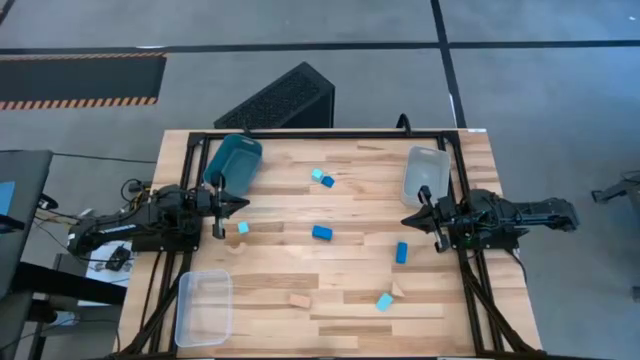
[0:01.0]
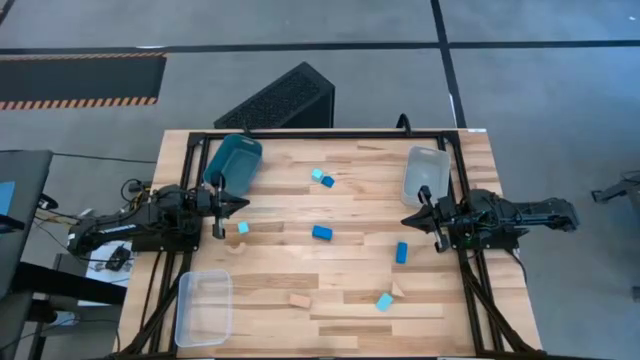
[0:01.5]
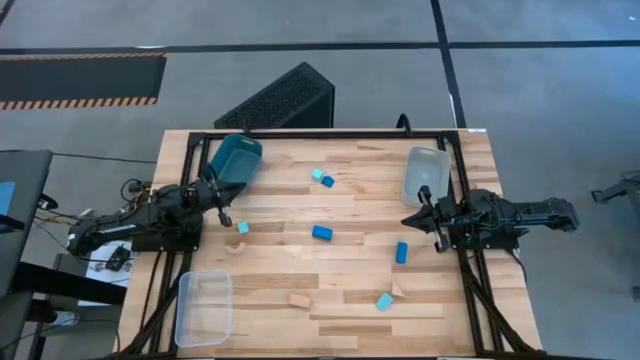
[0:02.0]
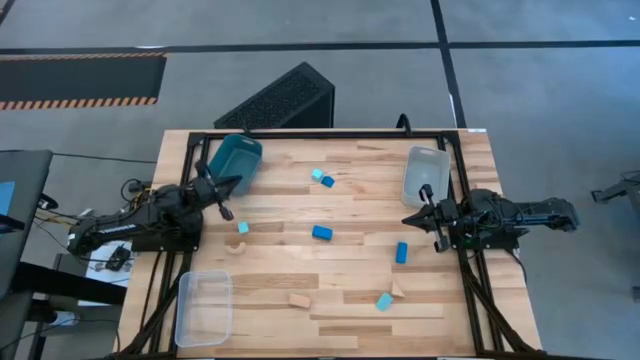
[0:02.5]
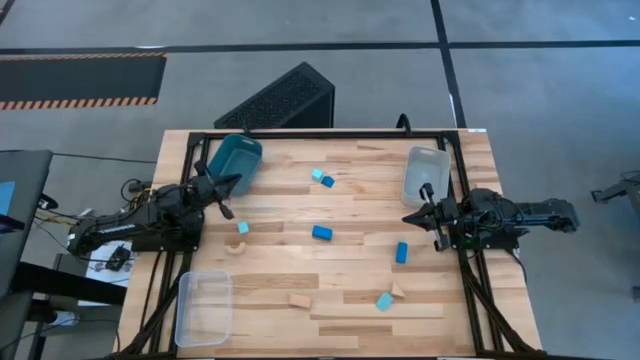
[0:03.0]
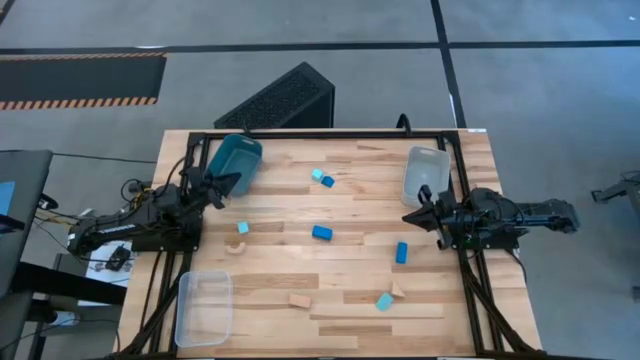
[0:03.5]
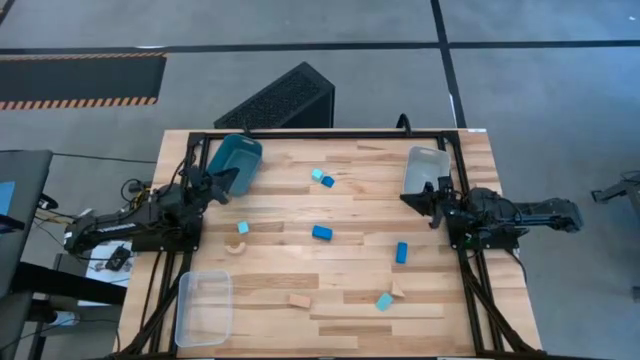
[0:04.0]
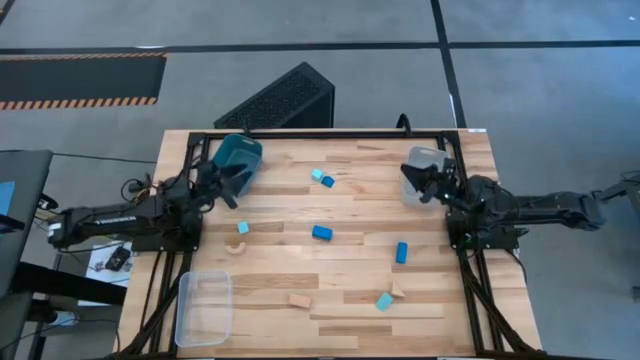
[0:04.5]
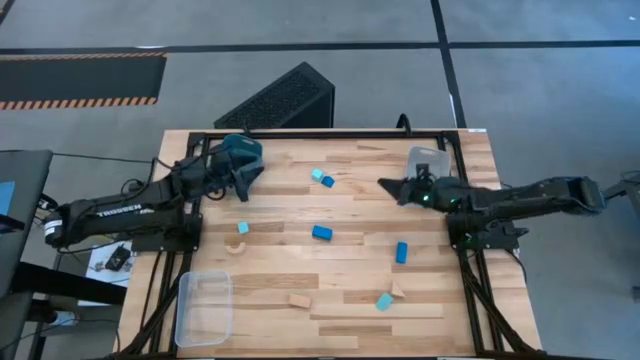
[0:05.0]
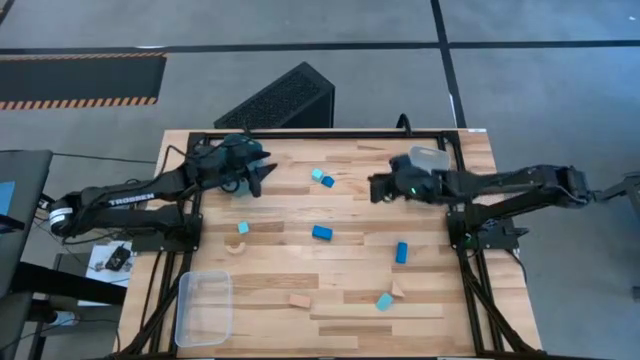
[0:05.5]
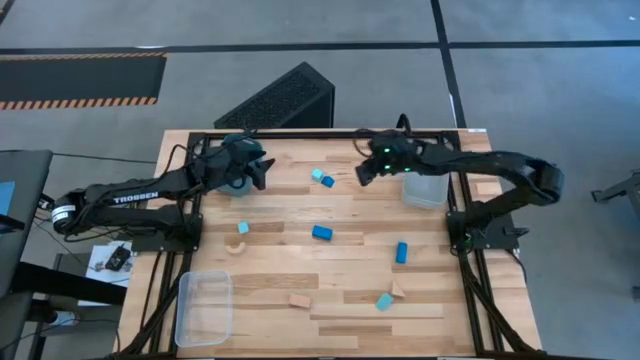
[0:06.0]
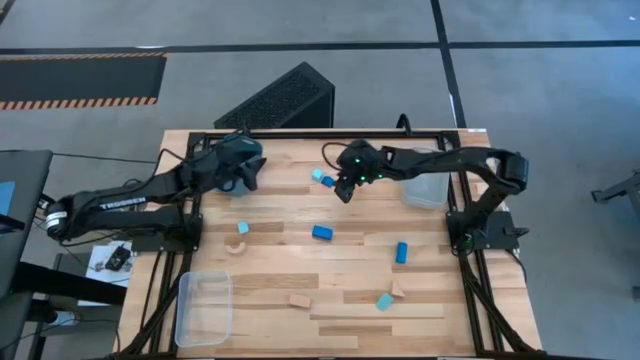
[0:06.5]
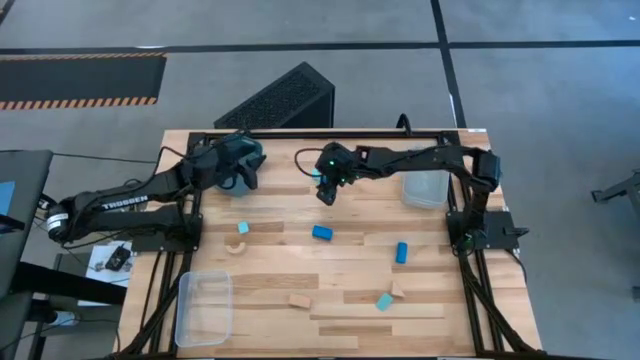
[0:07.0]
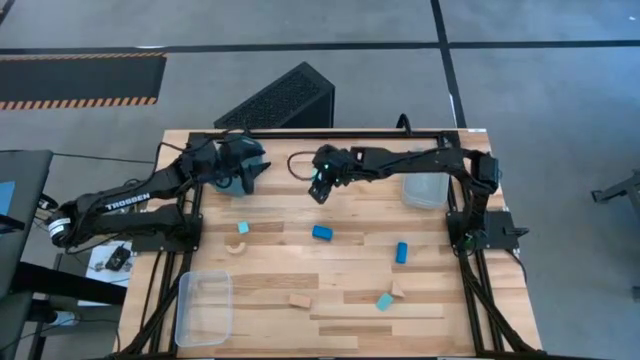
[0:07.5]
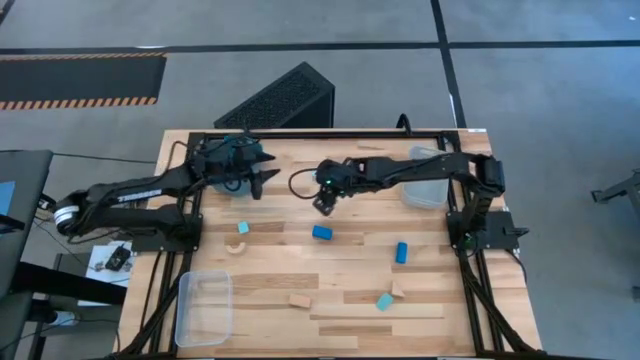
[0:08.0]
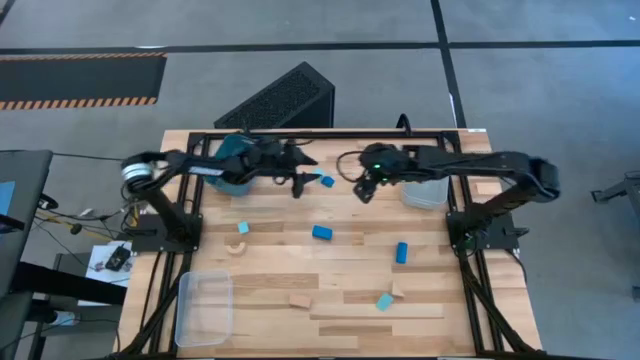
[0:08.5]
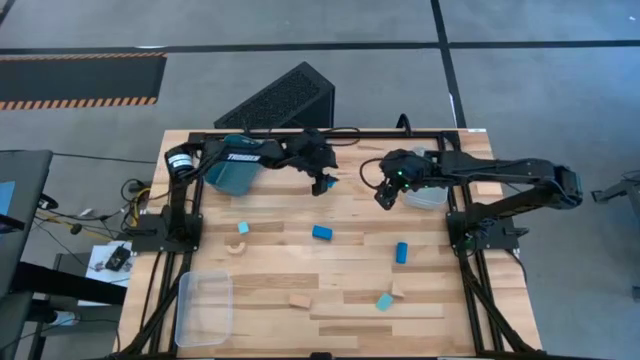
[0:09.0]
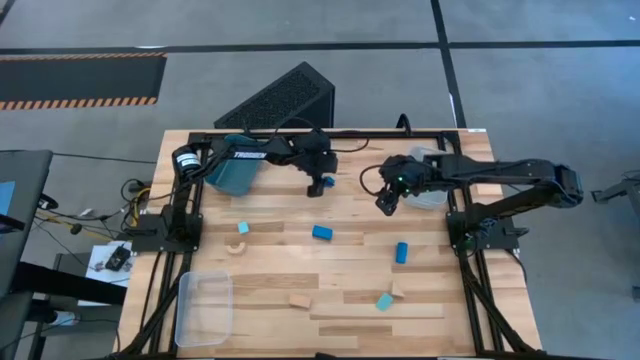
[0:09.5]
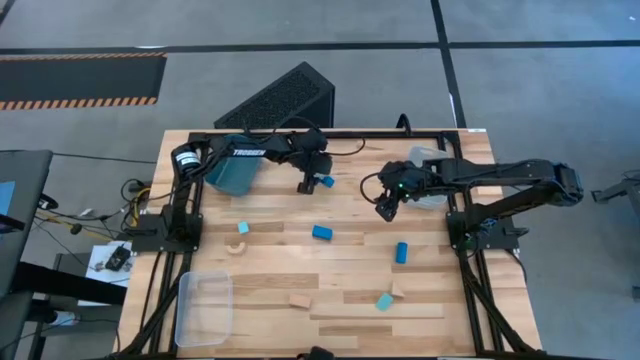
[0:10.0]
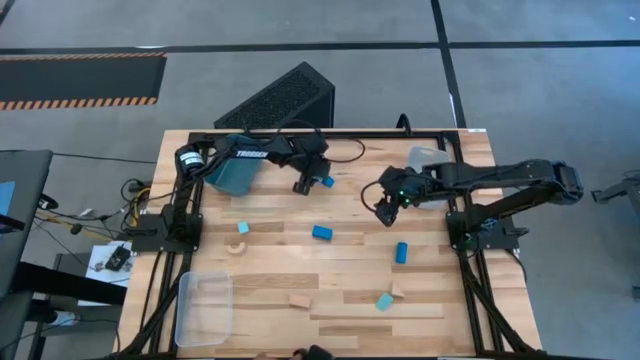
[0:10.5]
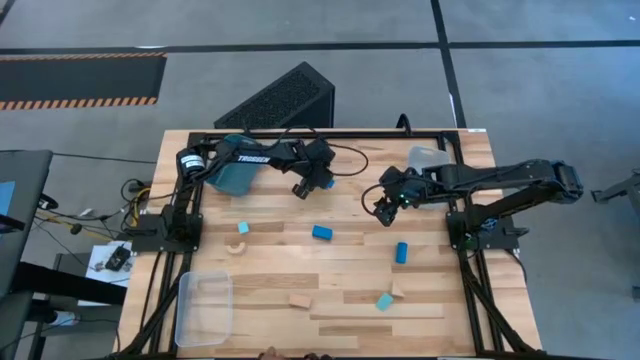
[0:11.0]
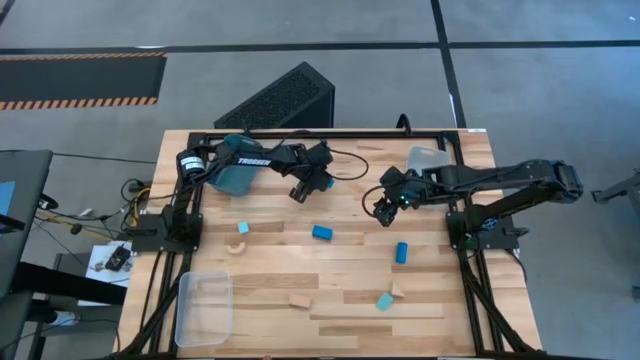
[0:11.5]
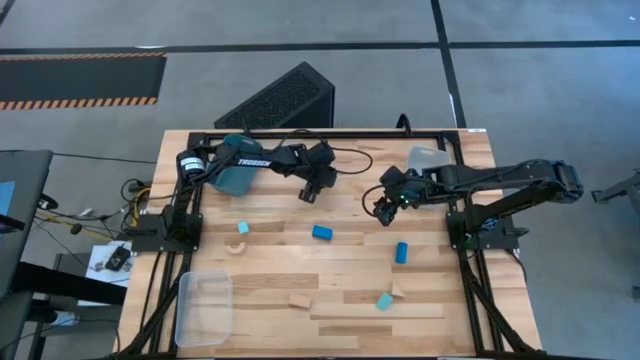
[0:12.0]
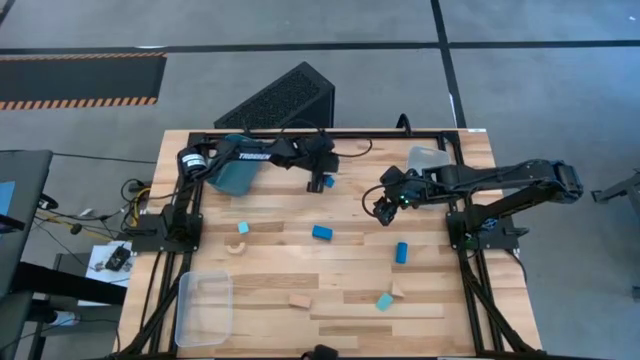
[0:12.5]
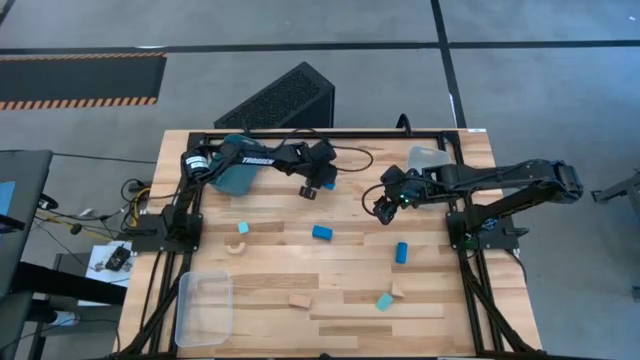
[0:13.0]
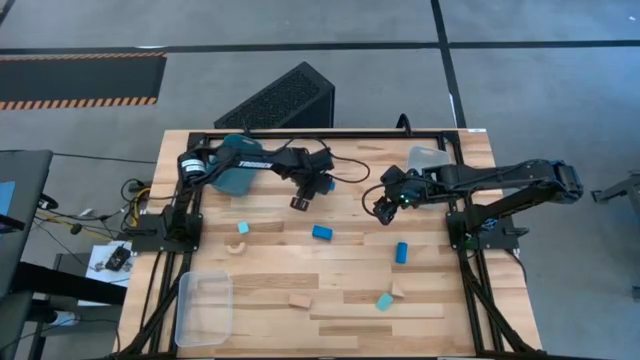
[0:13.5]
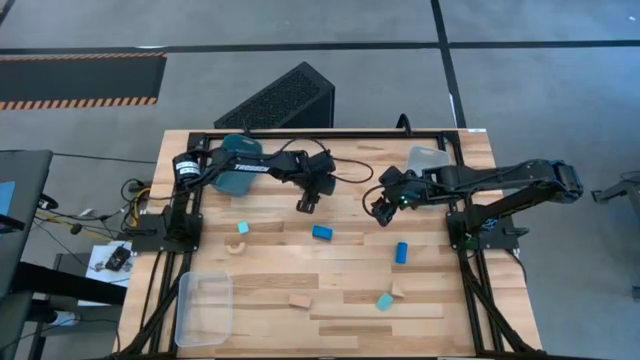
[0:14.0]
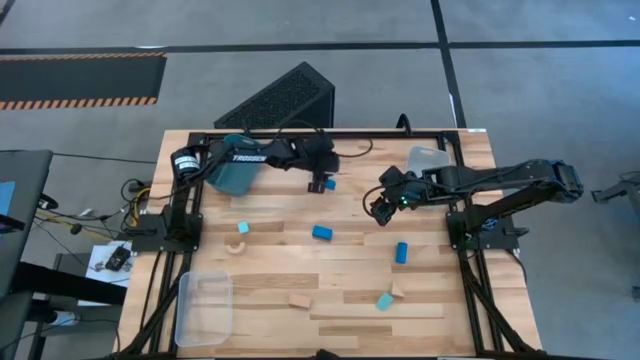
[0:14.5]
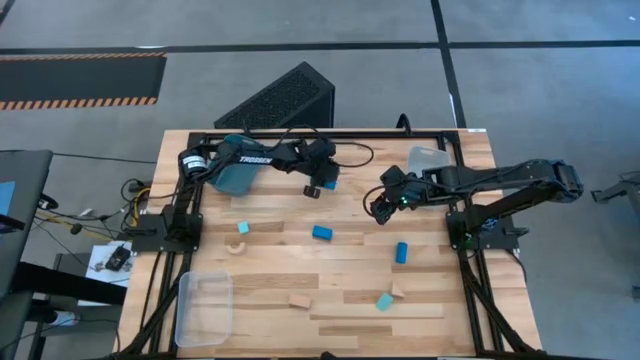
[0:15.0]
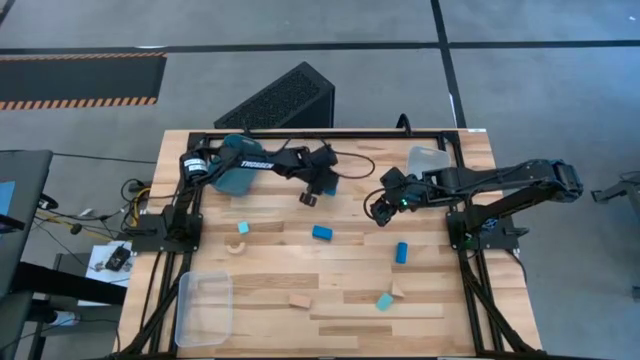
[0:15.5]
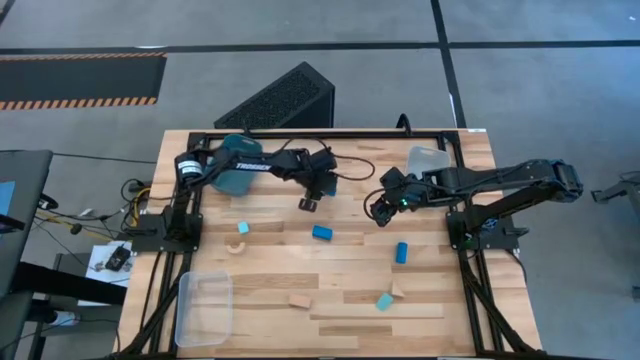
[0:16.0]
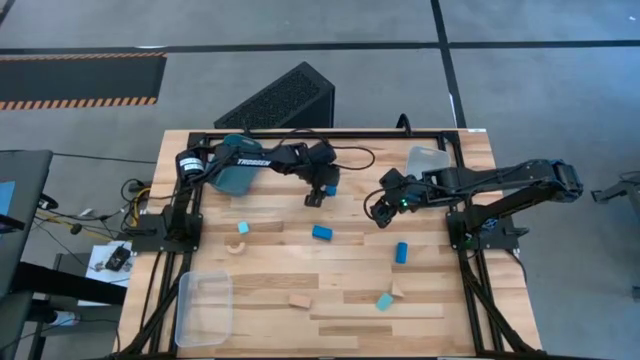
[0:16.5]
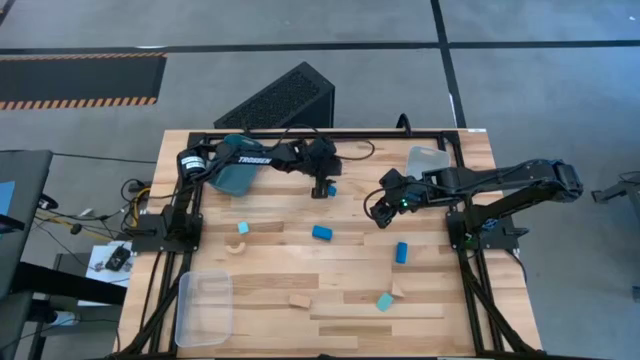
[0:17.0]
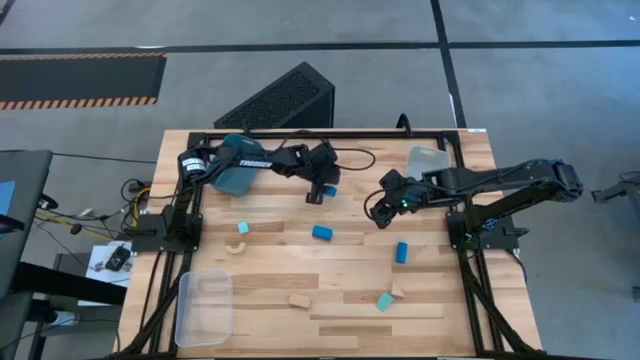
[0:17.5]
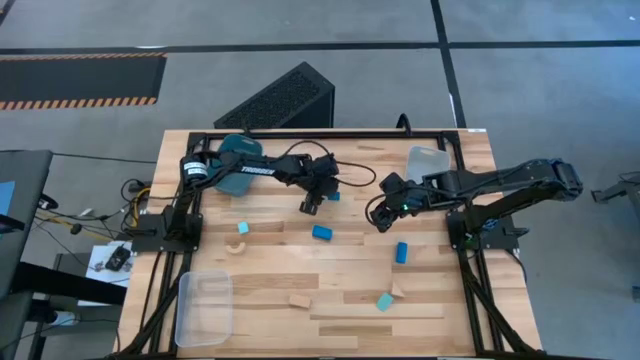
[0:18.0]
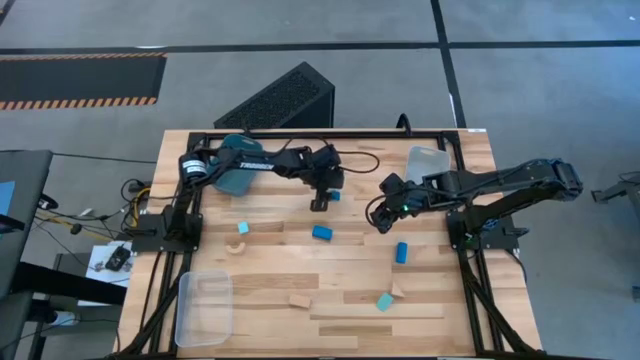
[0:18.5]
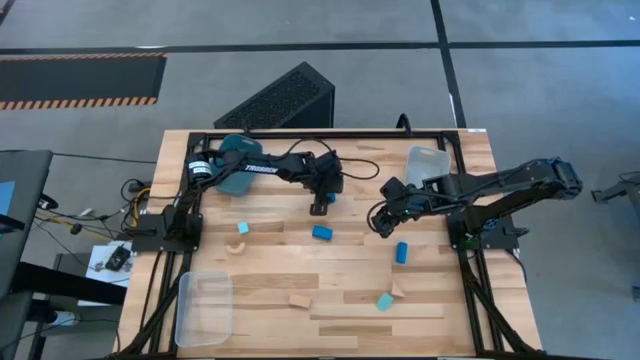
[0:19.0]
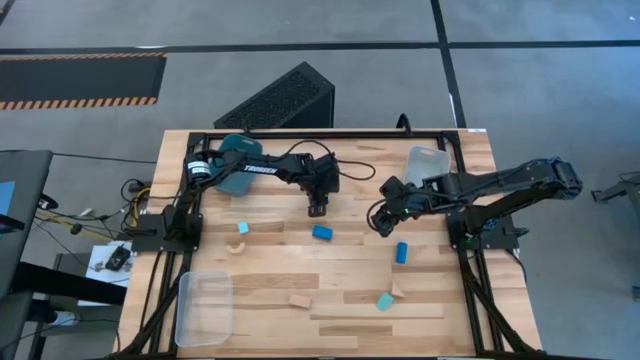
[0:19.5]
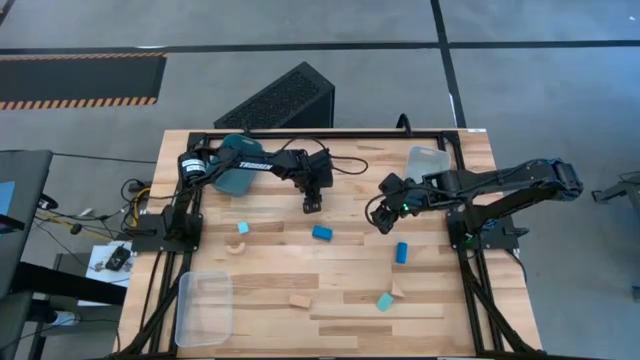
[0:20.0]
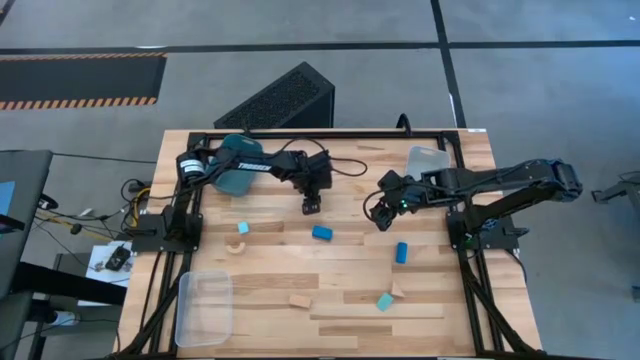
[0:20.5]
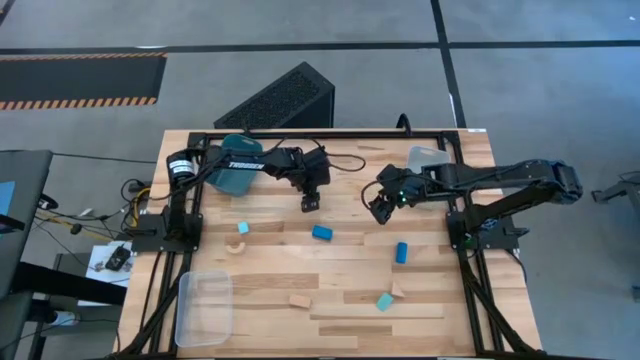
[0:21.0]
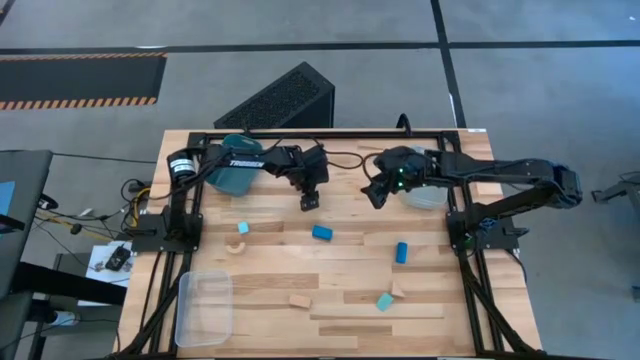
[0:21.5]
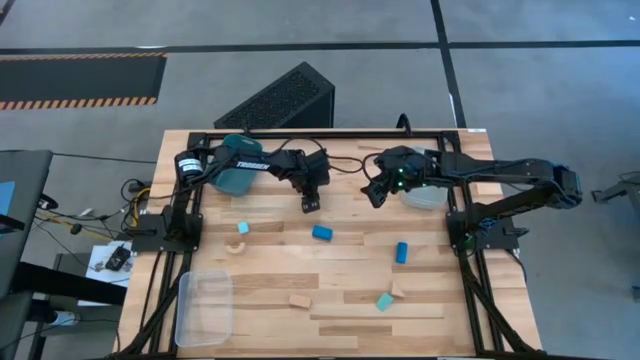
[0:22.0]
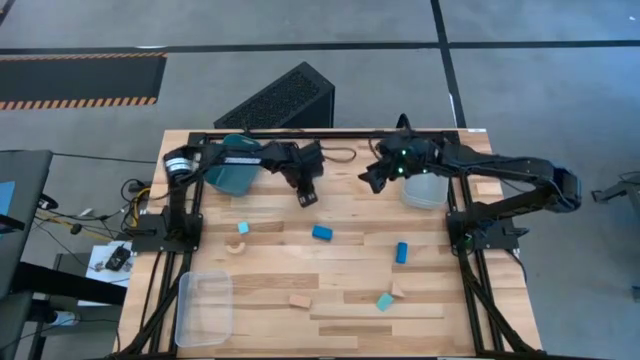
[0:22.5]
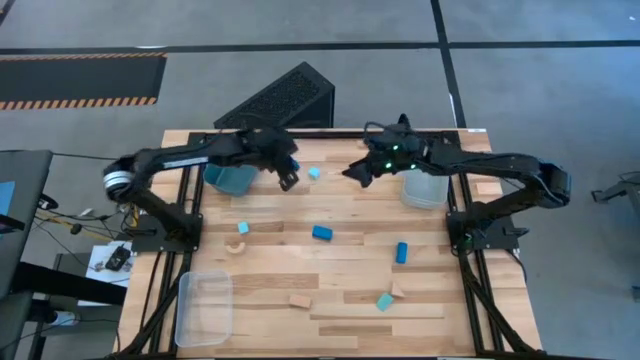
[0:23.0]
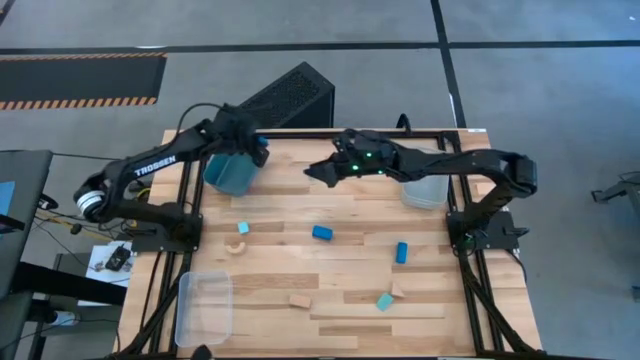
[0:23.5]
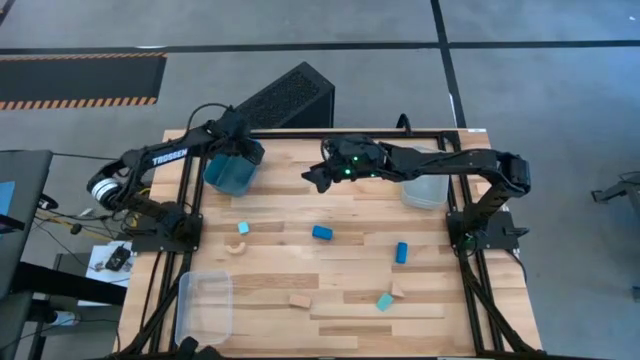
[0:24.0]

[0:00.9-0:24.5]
Task: Sort & place blocks by color
Put the top left blue block into the blue bin
